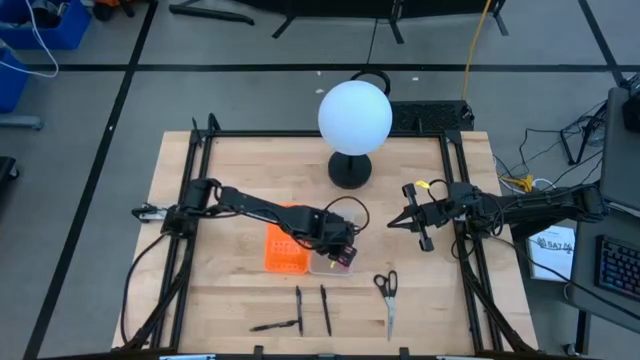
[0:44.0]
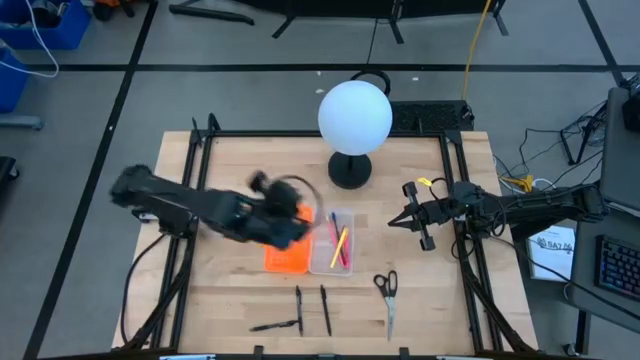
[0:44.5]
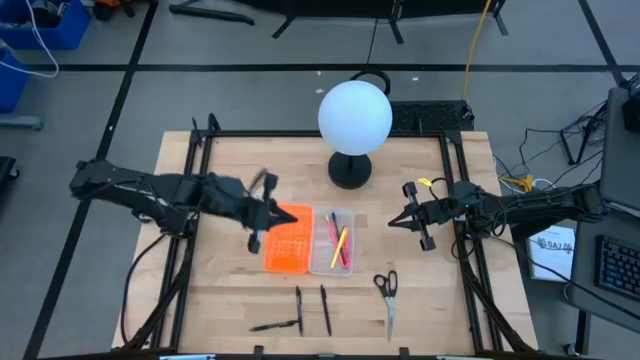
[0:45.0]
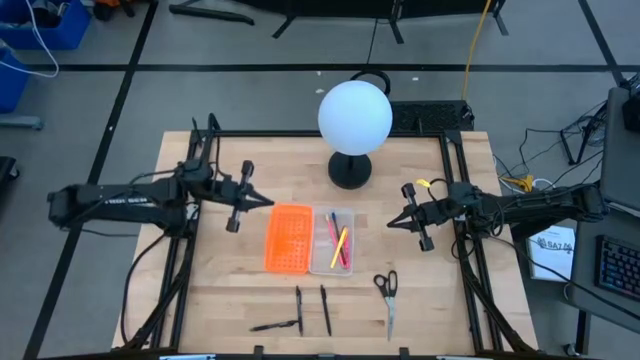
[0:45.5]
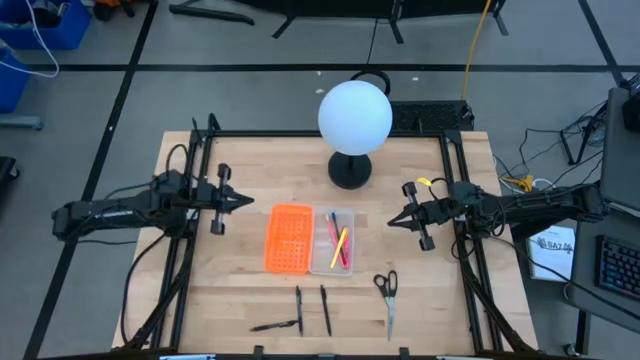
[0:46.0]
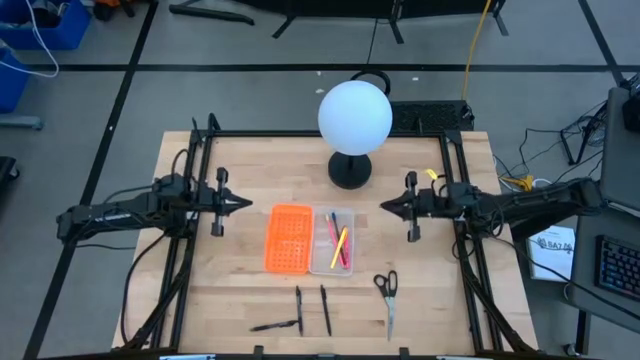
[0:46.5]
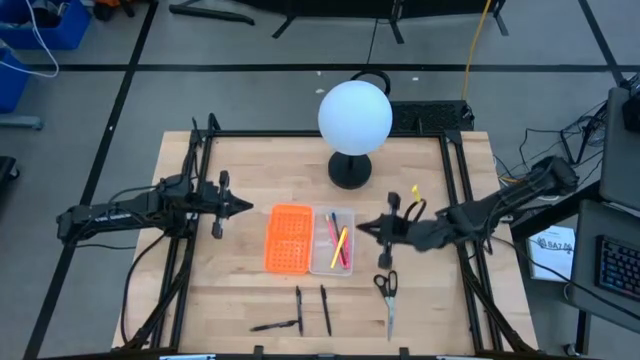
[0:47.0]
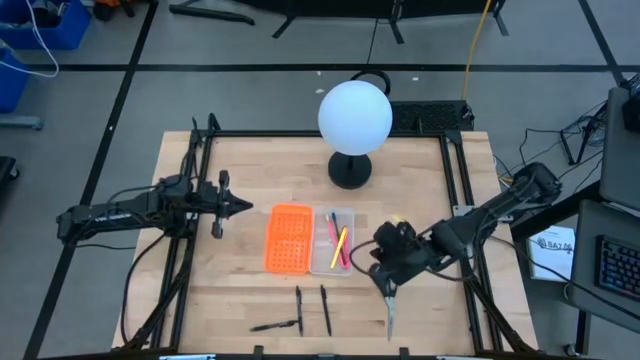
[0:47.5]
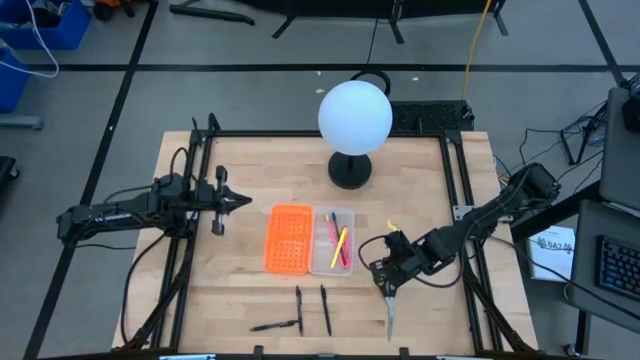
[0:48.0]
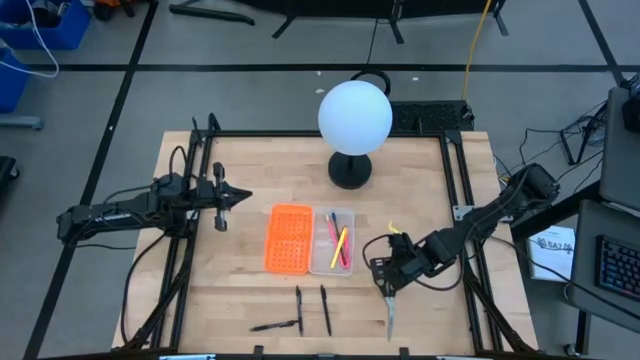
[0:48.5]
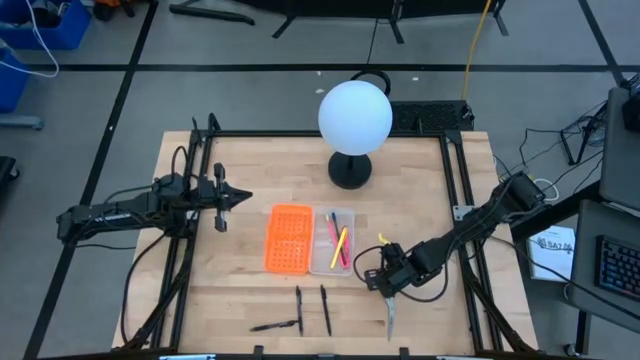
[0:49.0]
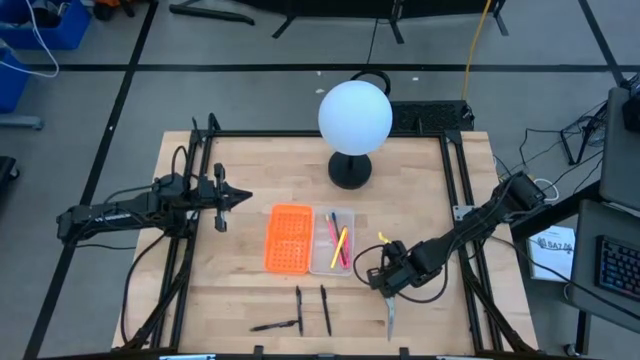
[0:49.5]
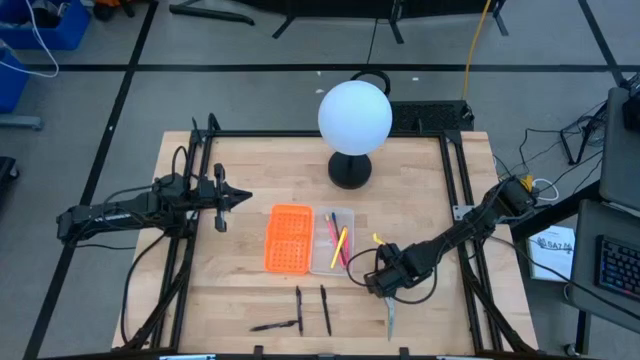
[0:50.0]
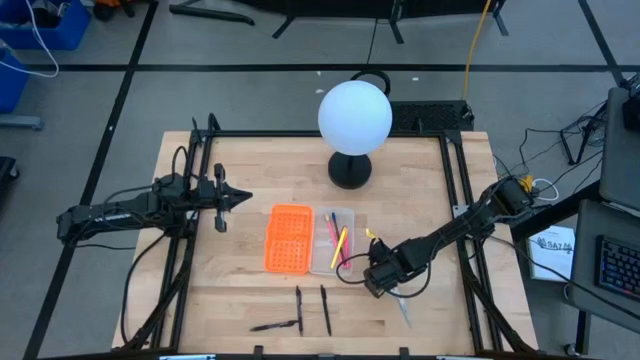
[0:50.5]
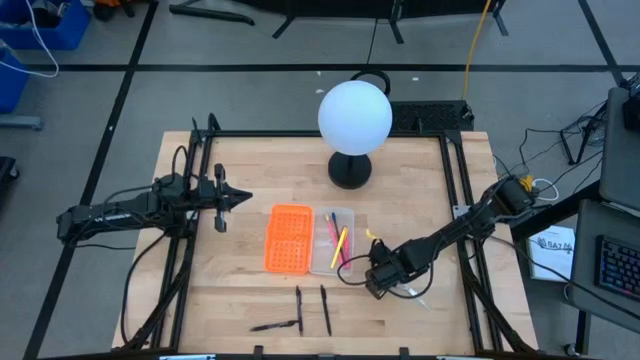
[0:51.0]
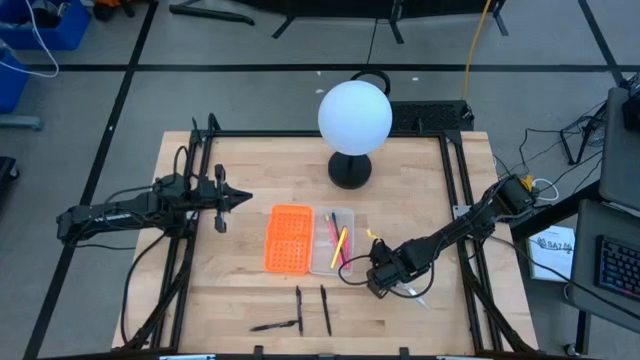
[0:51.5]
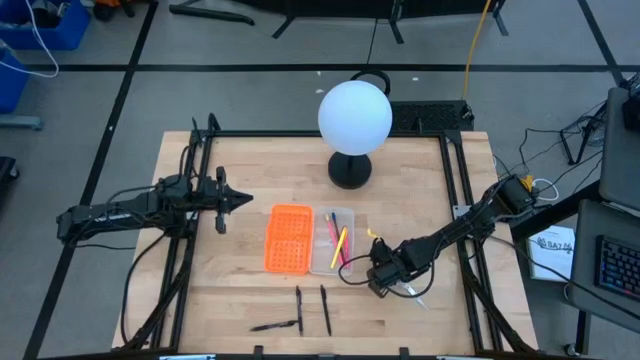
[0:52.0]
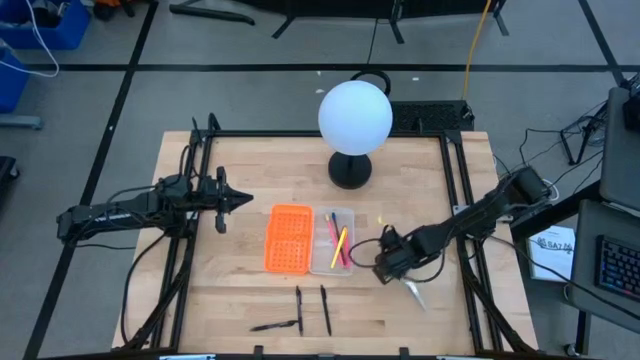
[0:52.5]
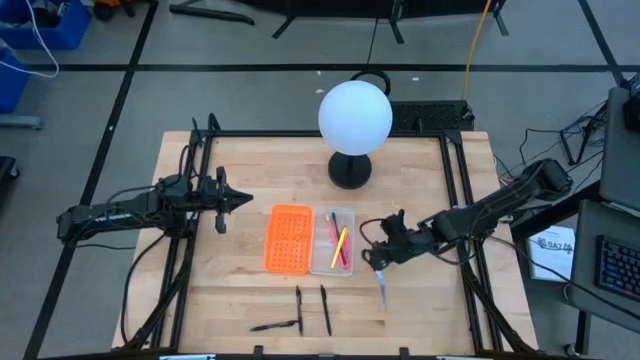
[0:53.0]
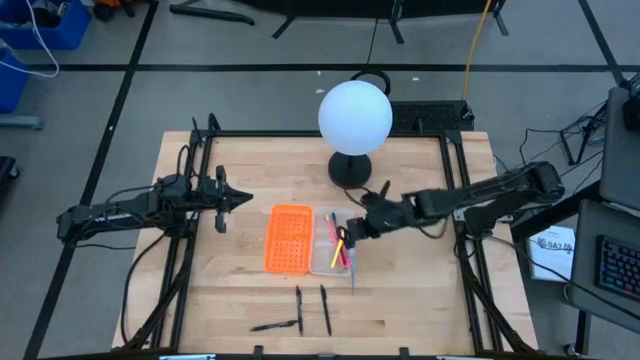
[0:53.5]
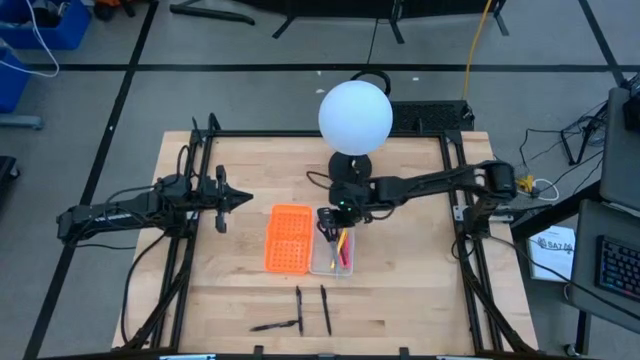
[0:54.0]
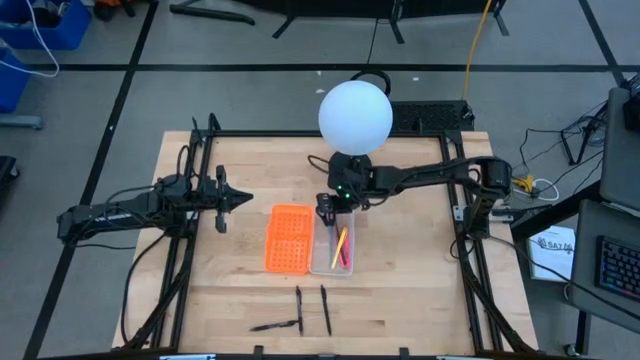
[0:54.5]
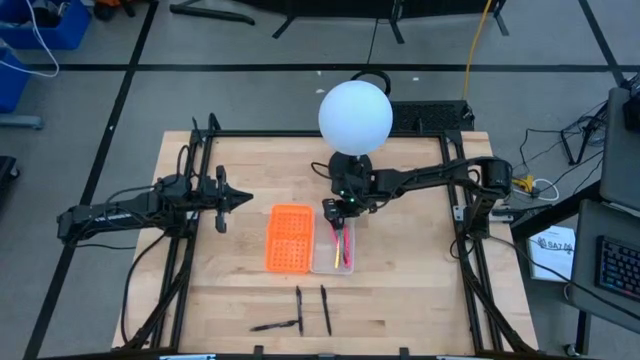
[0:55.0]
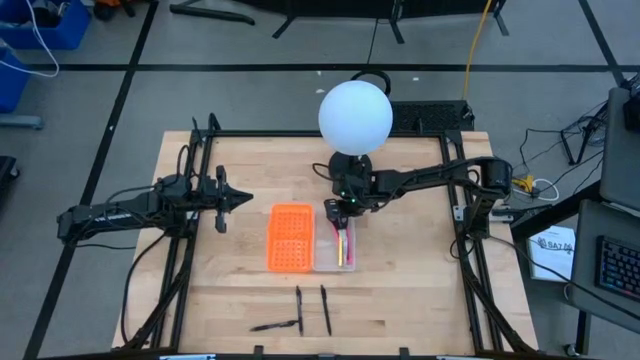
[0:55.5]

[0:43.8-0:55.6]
Task: Pick & place school supplies into a supply box
Put the scissors into the supply box

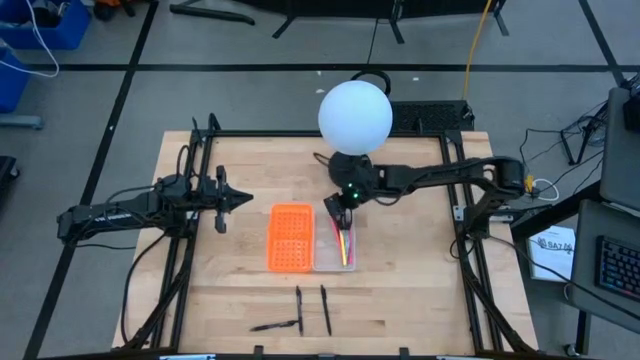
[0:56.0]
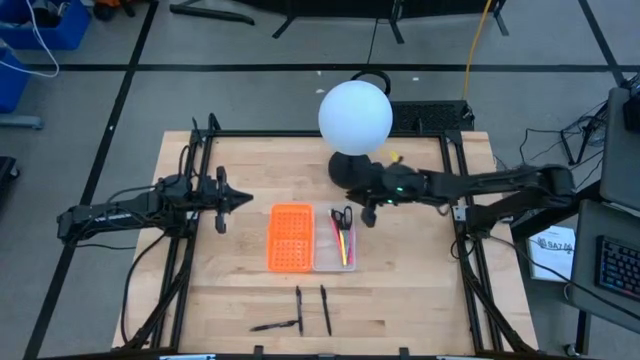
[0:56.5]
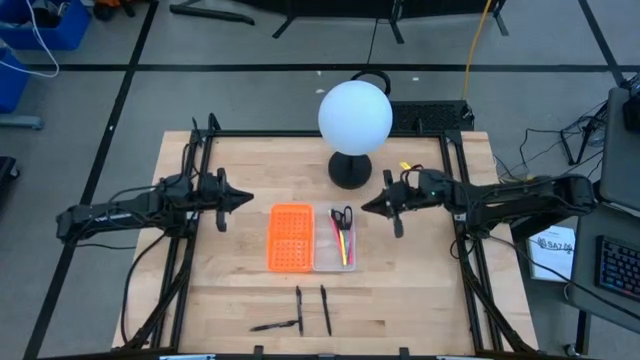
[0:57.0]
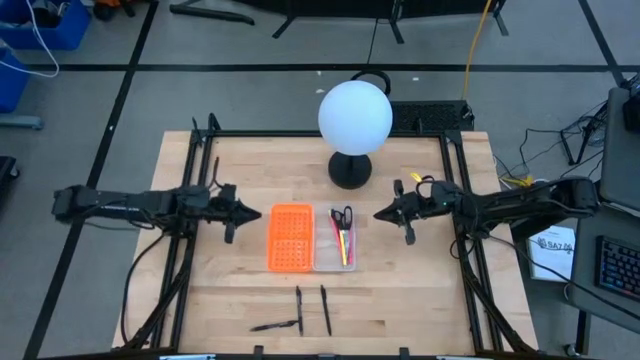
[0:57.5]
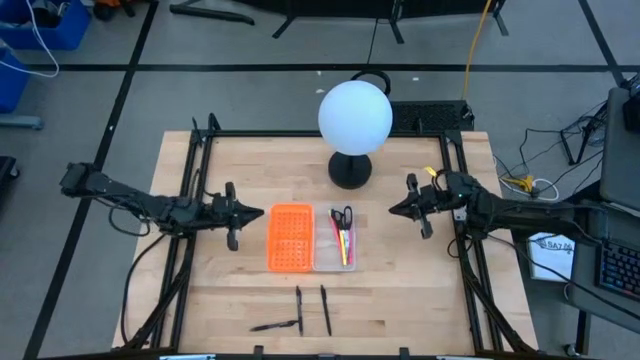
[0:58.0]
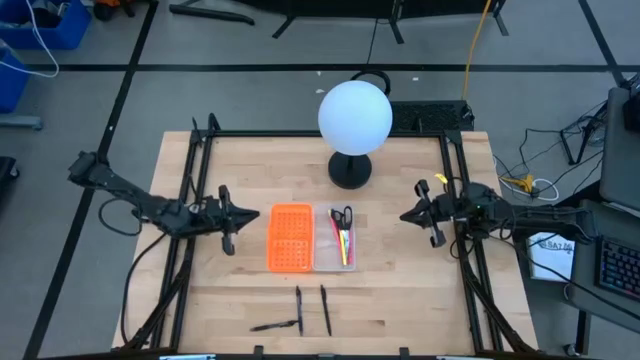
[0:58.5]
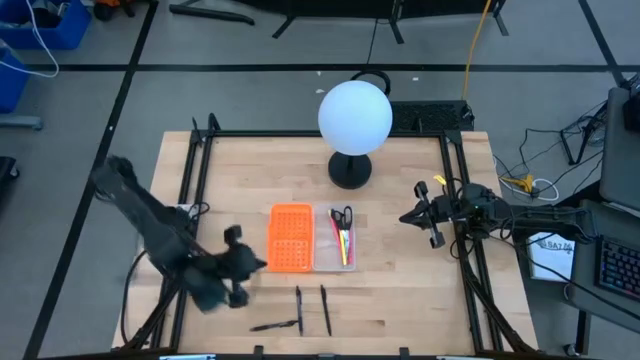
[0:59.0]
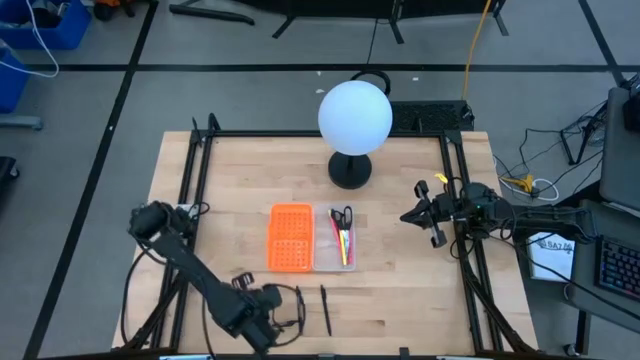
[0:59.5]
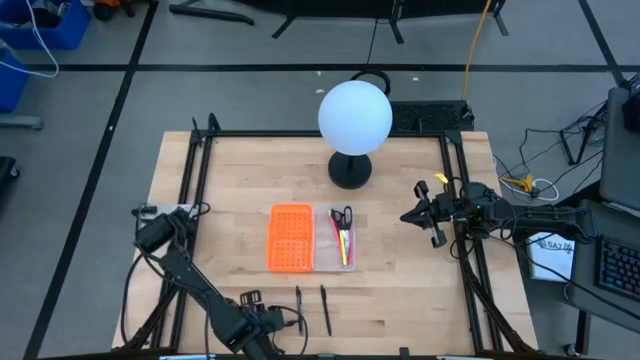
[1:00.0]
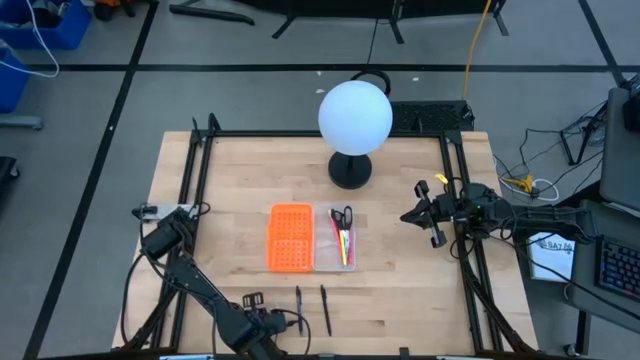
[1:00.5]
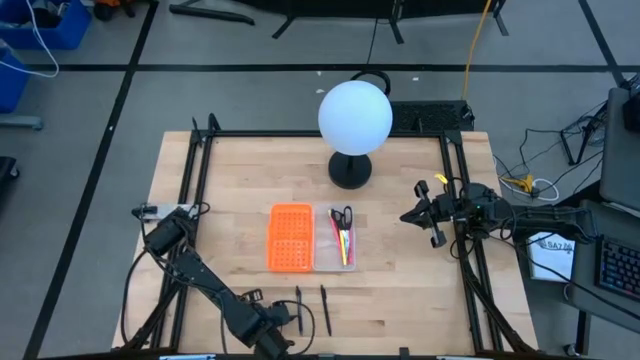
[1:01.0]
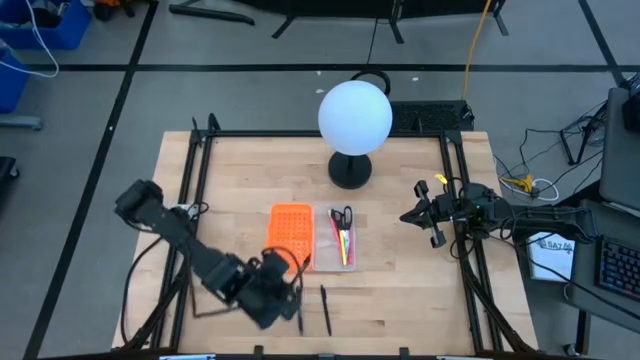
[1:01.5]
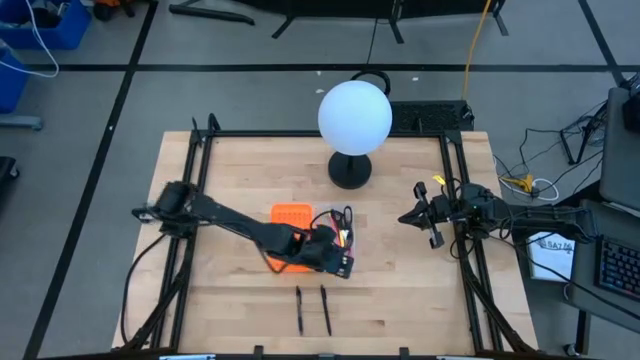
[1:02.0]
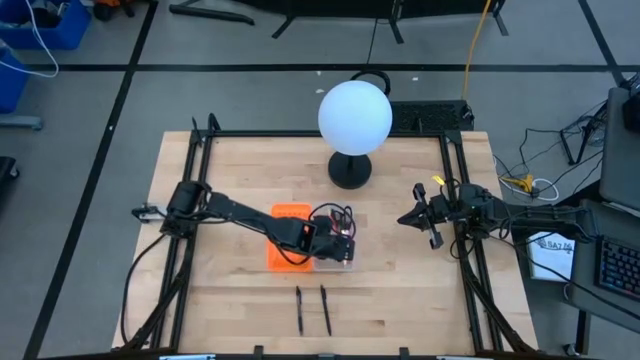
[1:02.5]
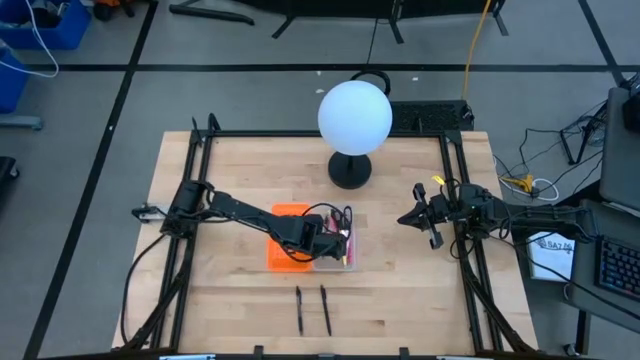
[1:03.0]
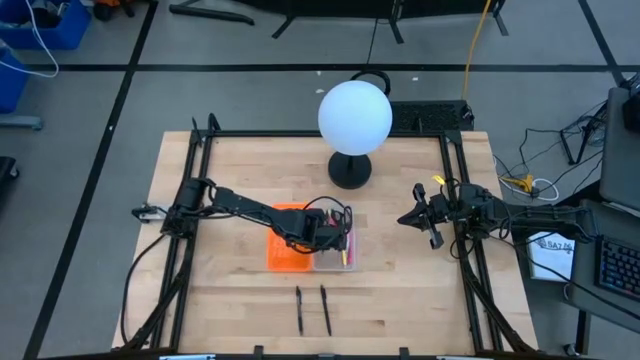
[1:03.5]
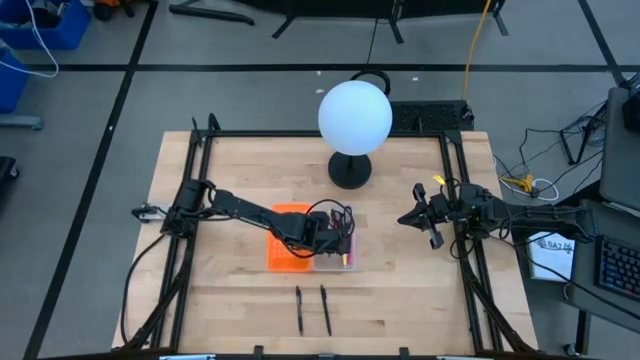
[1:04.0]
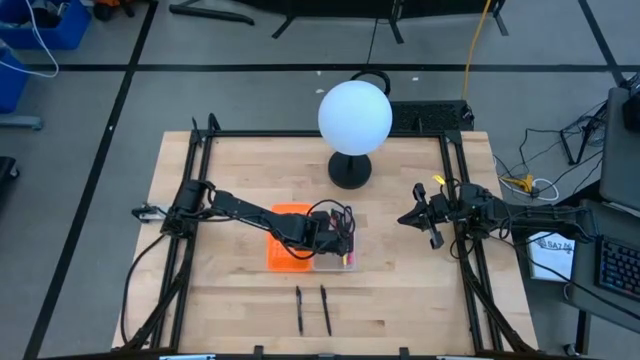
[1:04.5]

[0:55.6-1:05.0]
Put the left black pen into the supply box

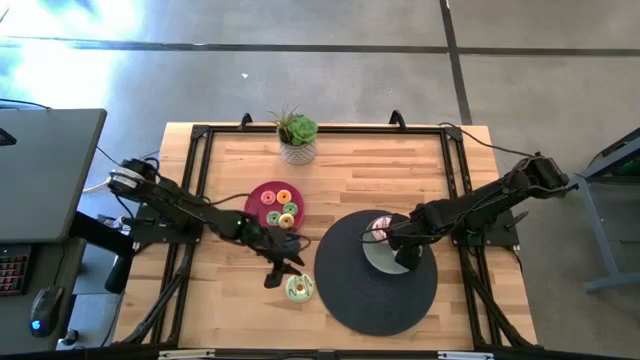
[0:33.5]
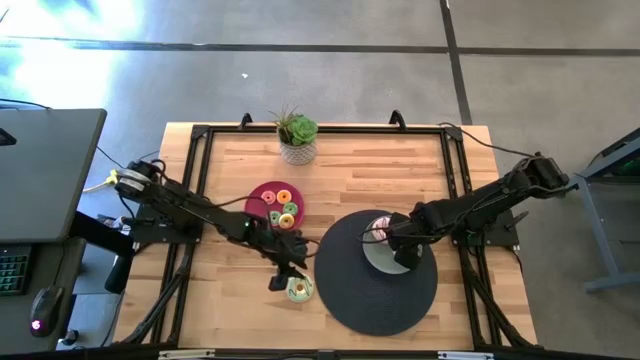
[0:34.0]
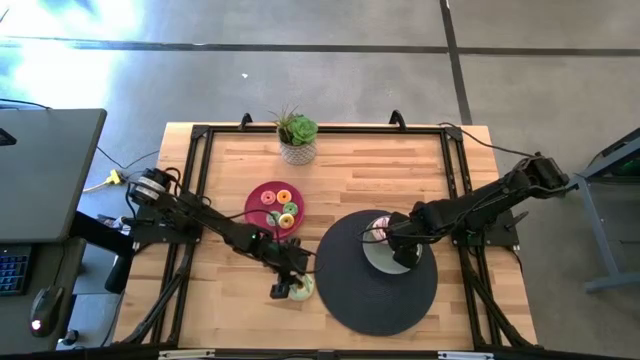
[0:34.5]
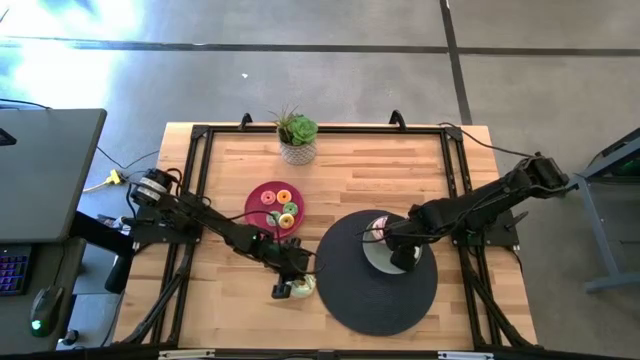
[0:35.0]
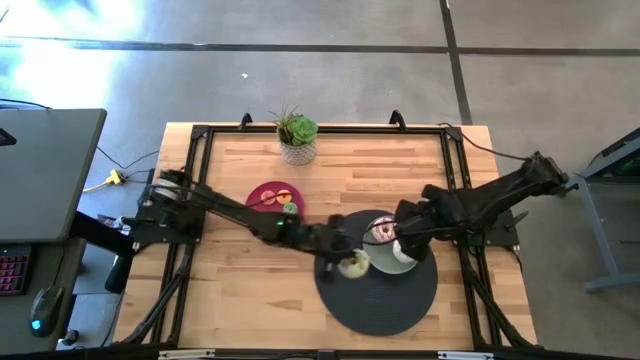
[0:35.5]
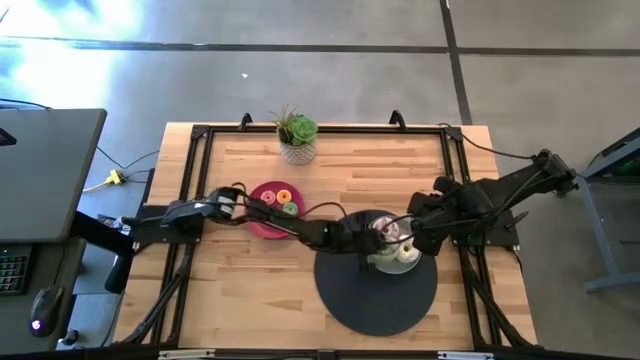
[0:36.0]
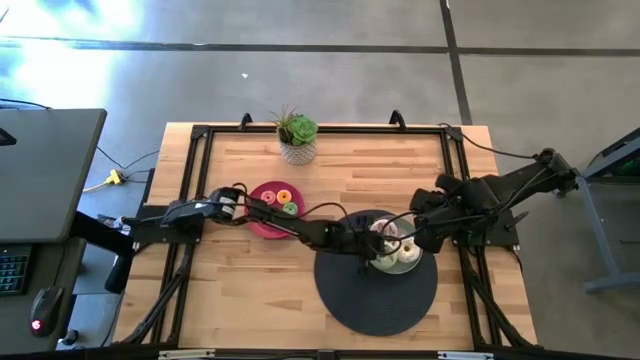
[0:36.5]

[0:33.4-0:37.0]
Task: Pick & Place donuts
Put the large blue donut on the blue plate
